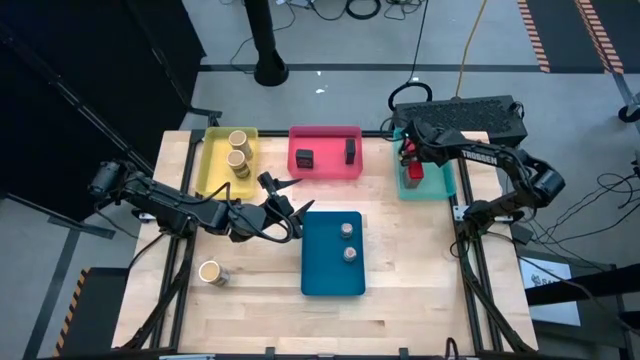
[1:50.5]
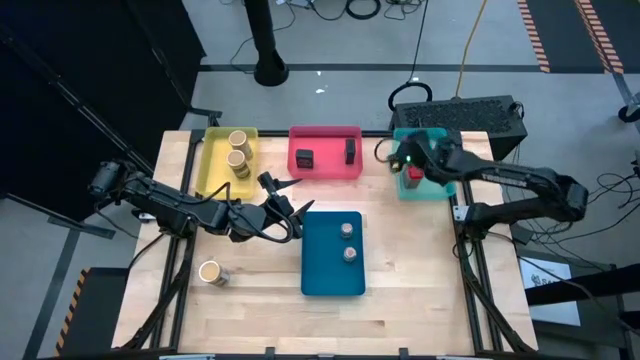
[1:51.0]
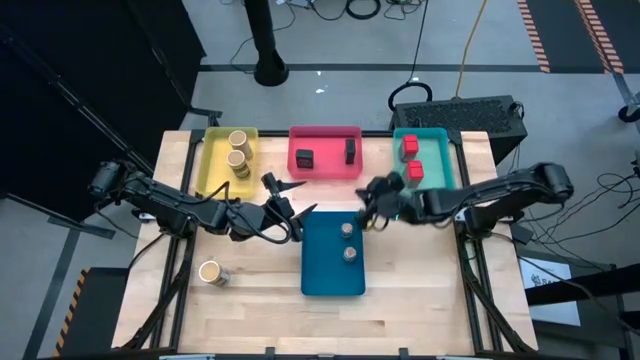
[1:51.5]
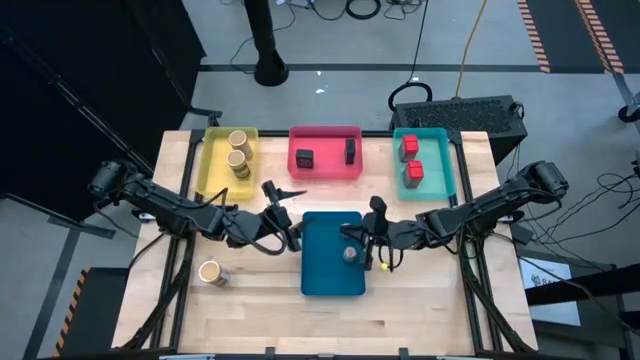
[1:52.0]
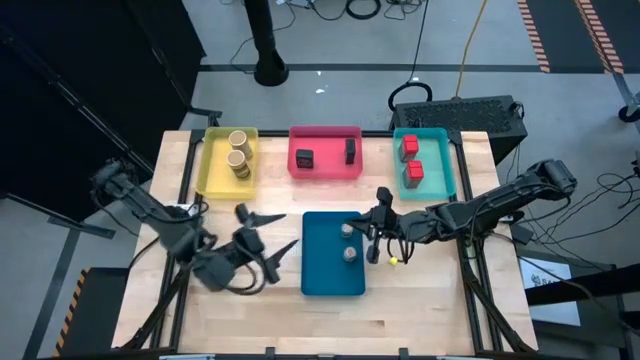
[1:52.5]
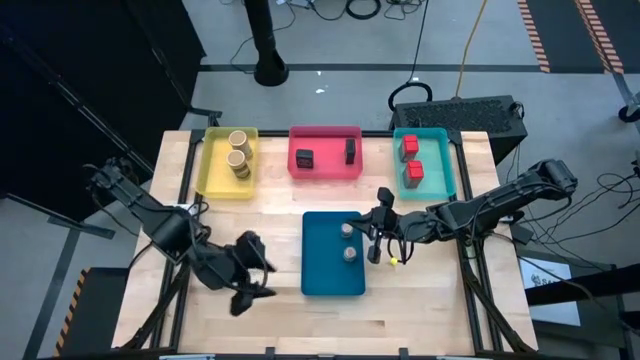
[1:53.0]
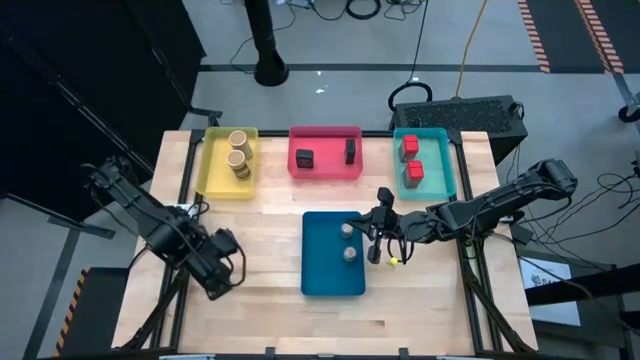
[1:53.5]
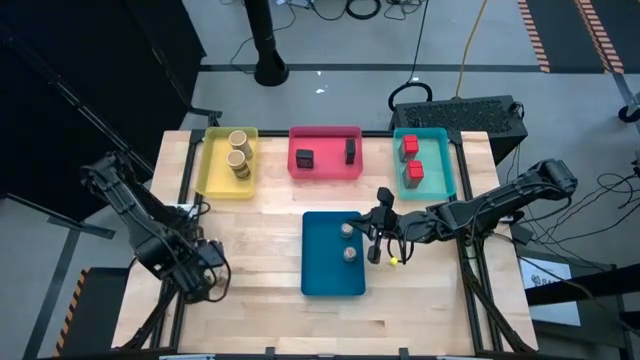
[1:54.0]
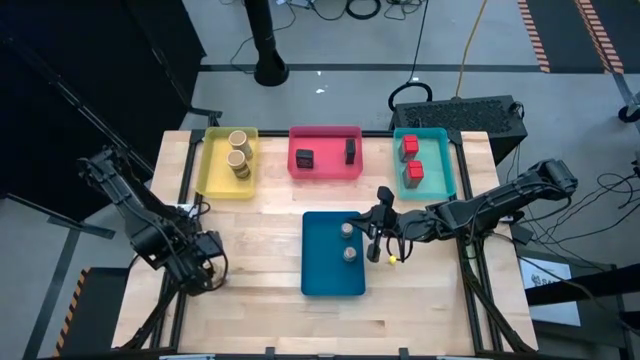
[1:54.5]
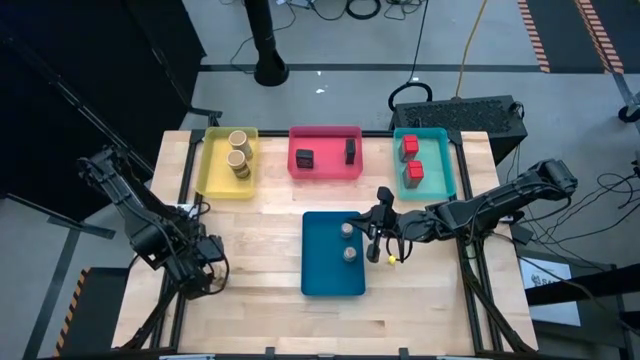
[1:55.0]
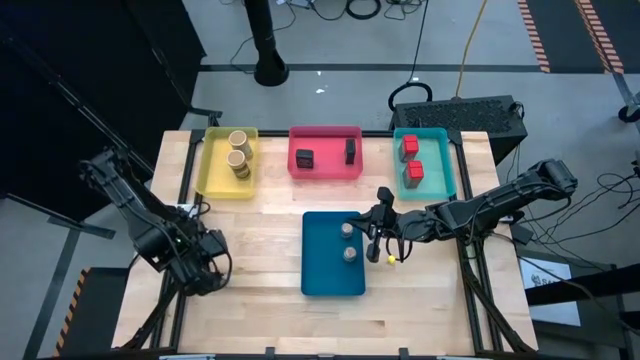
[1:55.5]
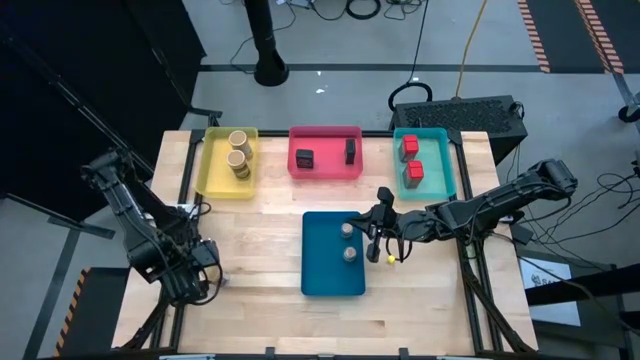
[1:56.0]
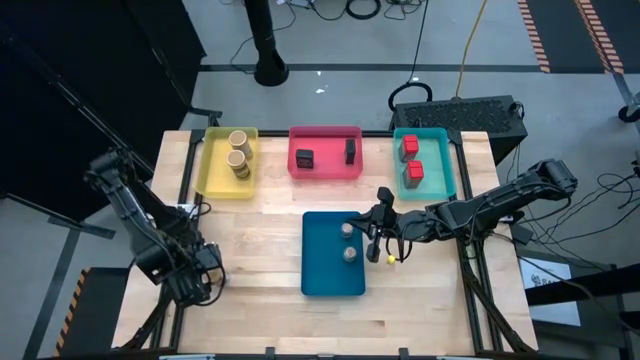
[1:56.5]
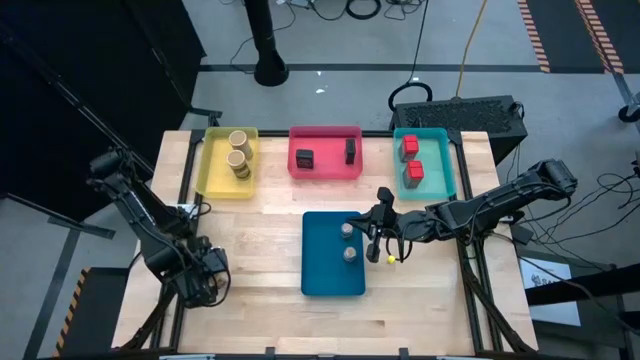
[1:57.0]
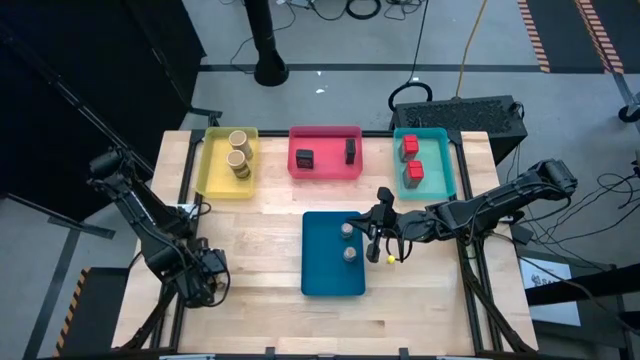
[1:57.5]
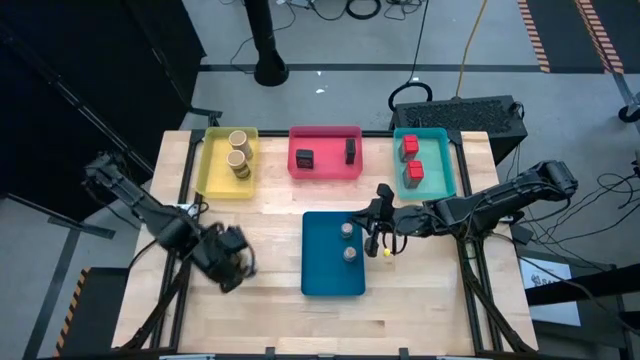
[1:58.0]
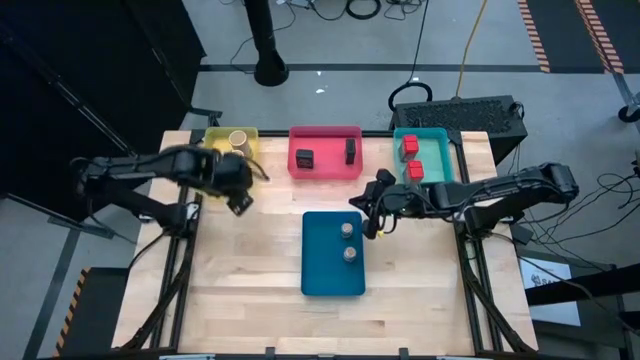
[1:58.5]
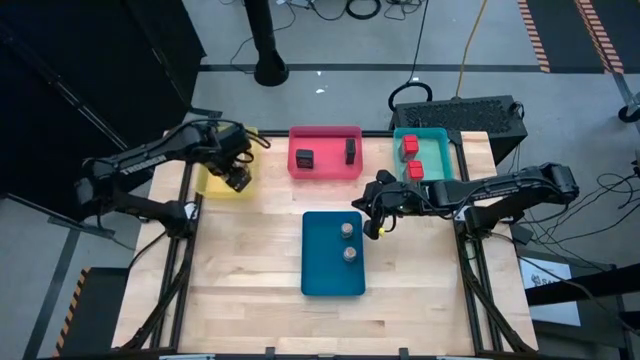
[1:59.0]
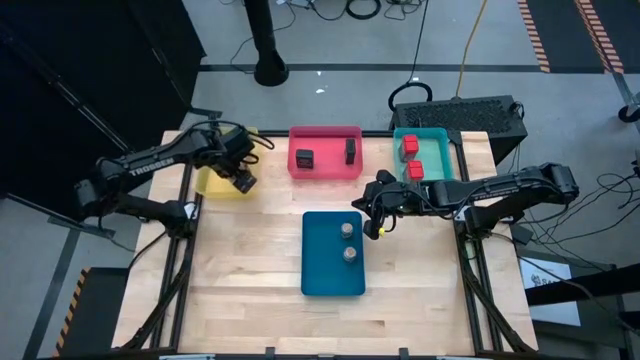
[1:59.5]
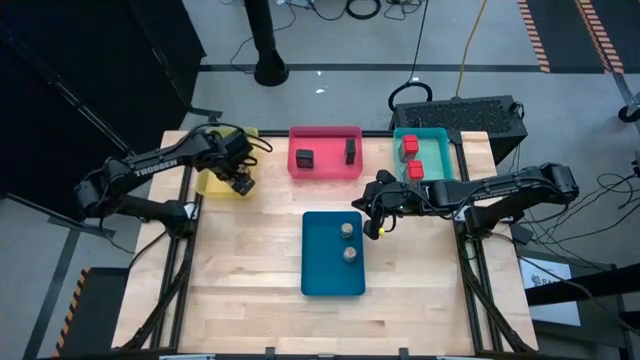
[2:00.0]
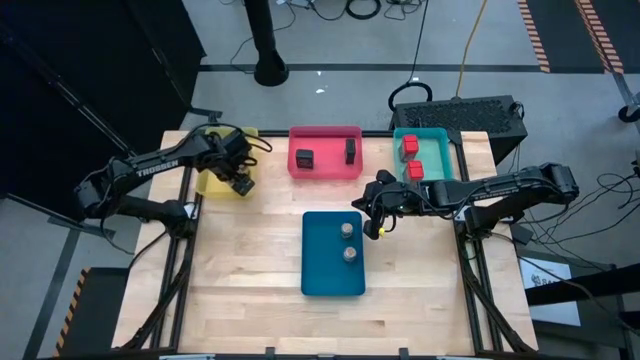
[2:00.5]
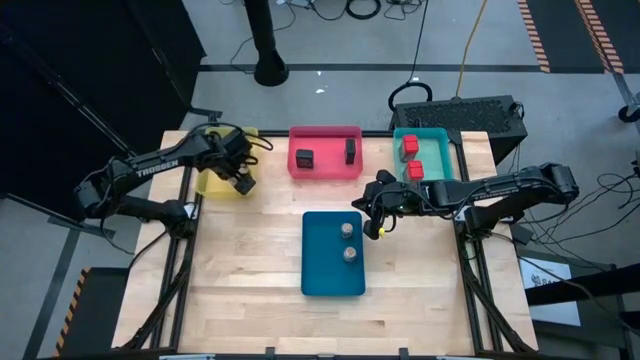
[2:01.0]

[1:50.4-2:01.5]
Task: Sort spices by type
Put the gold seasoning bottle into the yellow bin

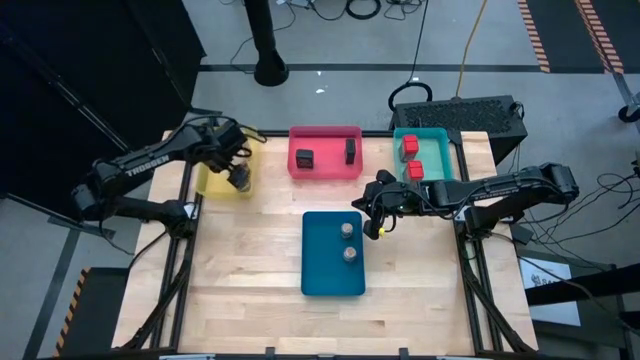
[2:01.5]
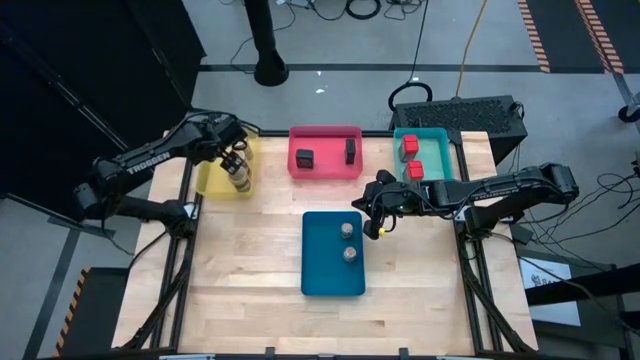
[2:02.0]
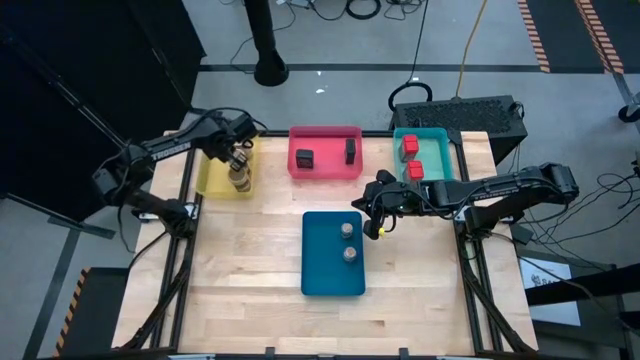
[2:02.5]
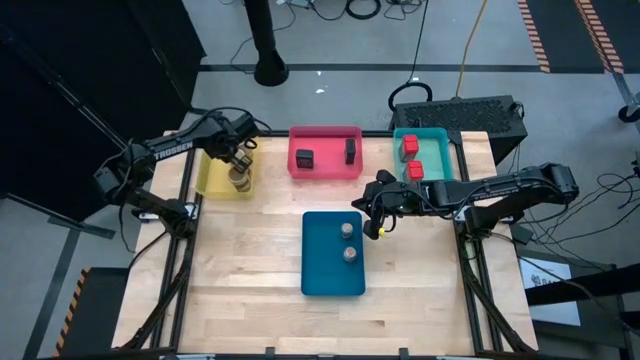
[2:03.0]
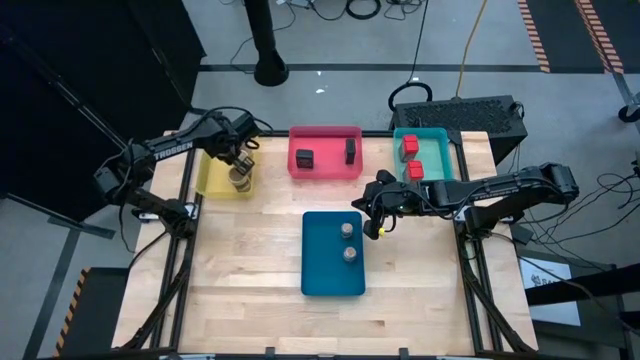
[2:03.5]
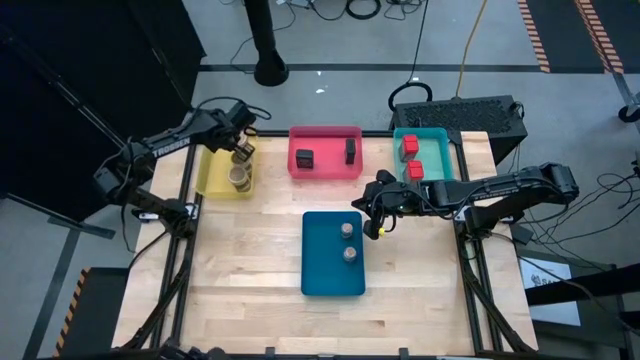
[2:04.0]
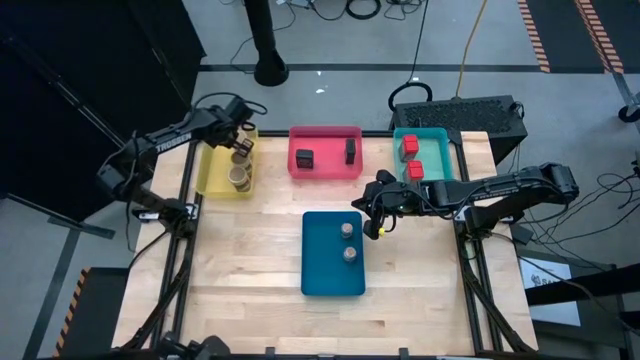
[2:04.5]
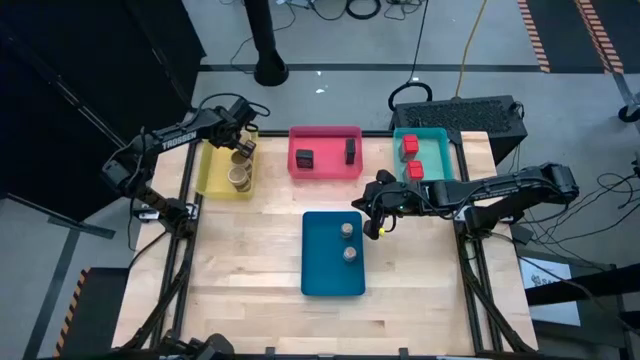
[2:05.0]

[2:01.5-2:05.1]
Adjust the gold seasoning bottles in the yellow bin

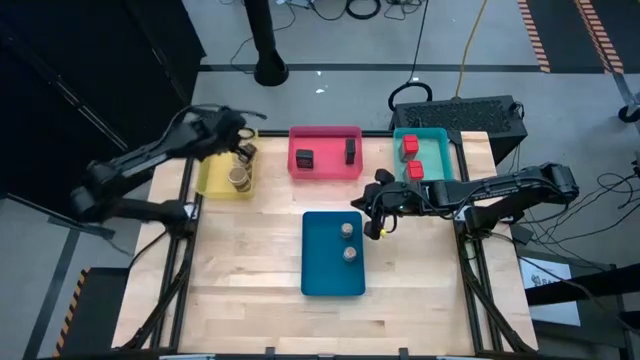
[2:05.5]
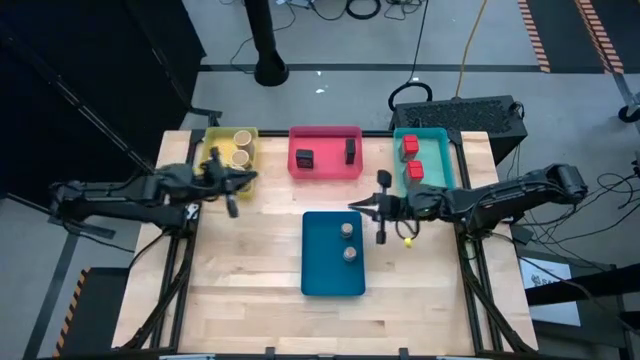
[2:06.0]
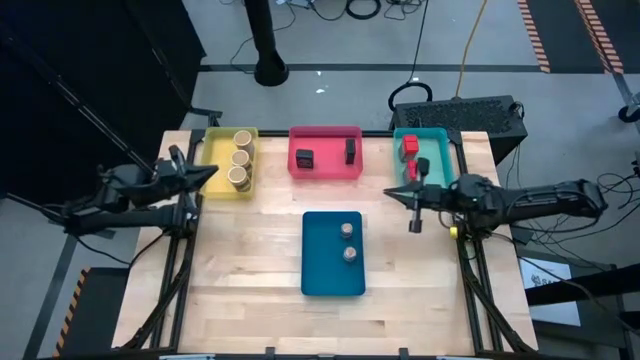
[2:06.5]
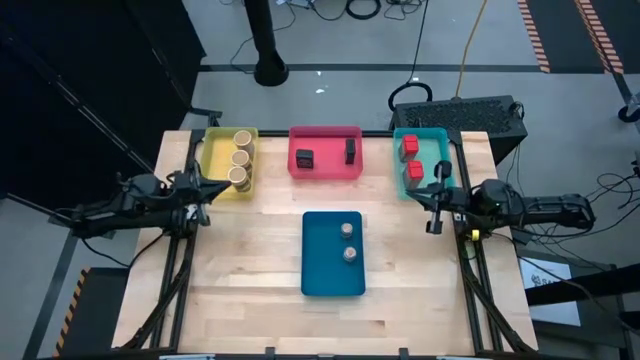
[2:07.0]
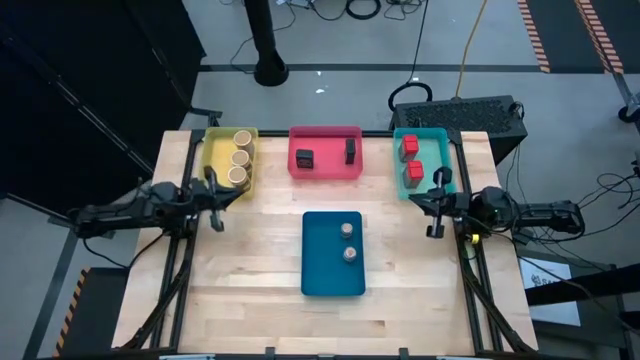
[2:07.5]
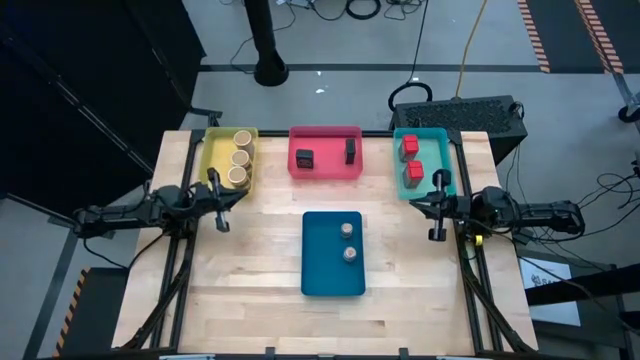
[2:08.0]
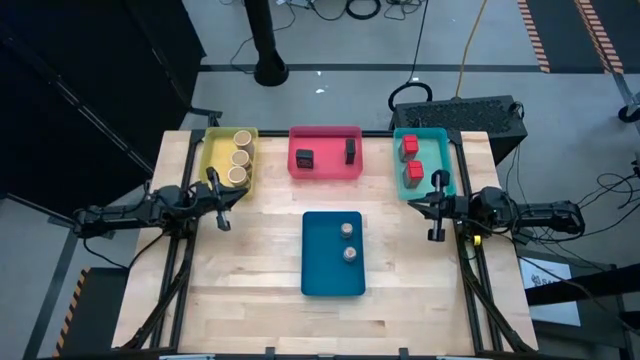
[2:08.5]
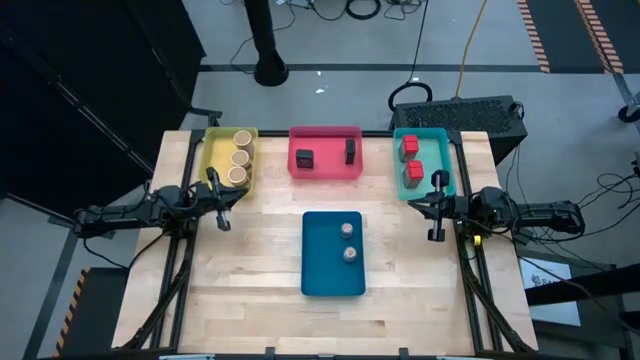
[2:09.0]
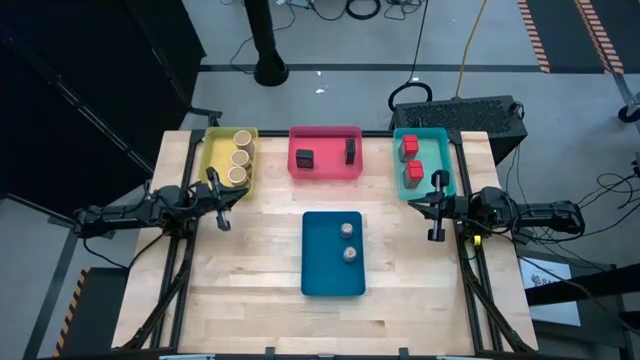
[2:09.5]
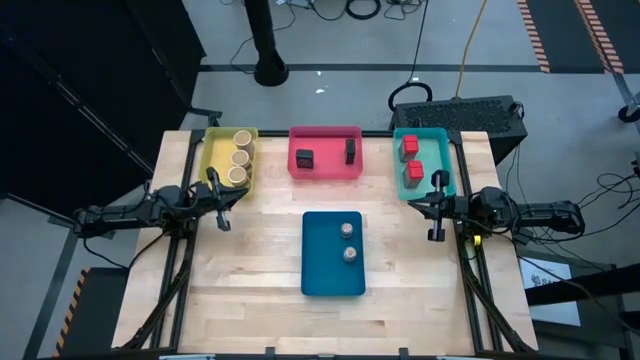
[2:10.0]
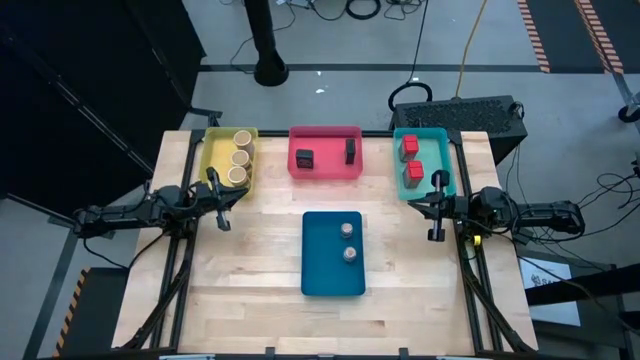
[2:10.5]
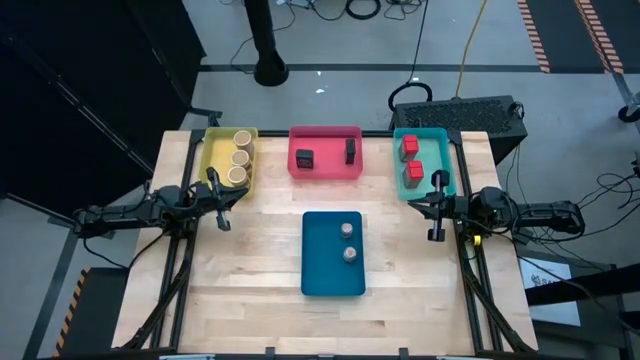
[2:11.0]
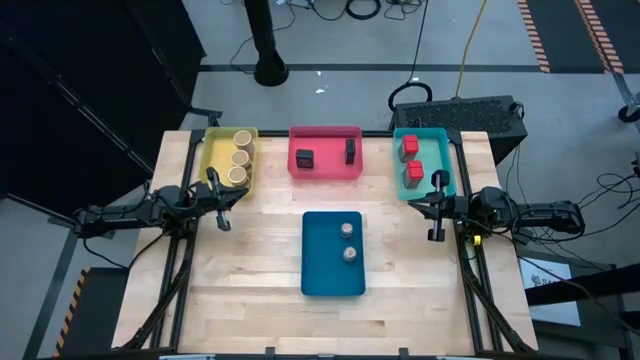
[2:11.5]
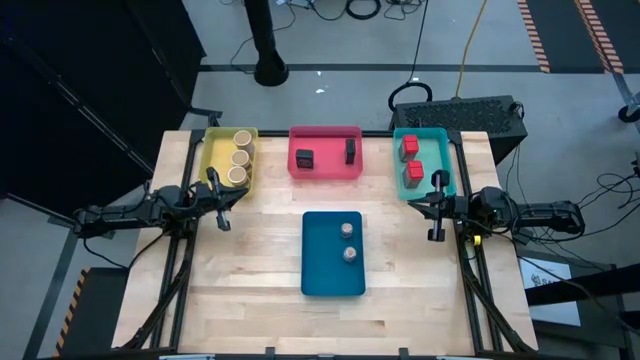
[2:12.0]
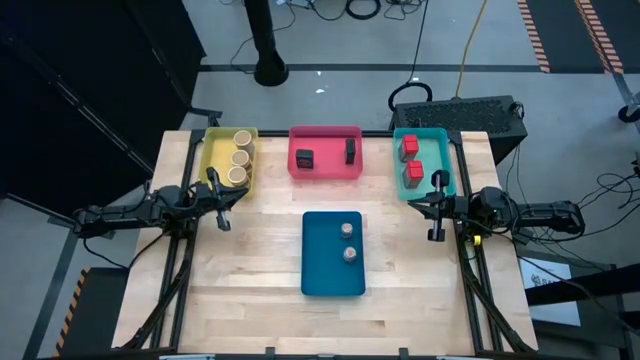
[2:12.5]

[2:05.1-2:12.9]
Return to Home Position
